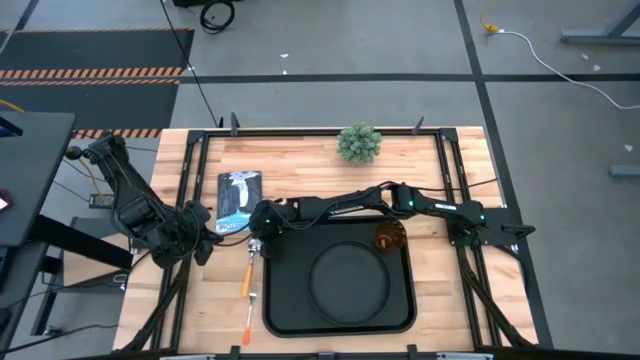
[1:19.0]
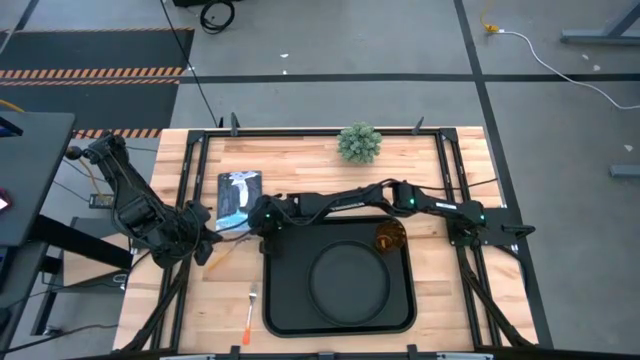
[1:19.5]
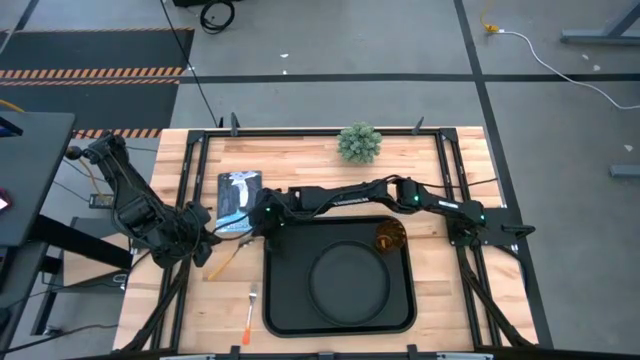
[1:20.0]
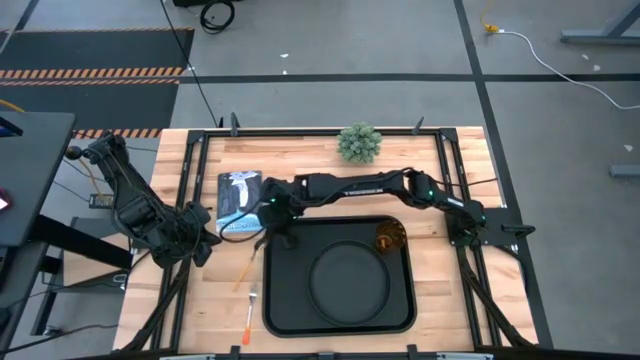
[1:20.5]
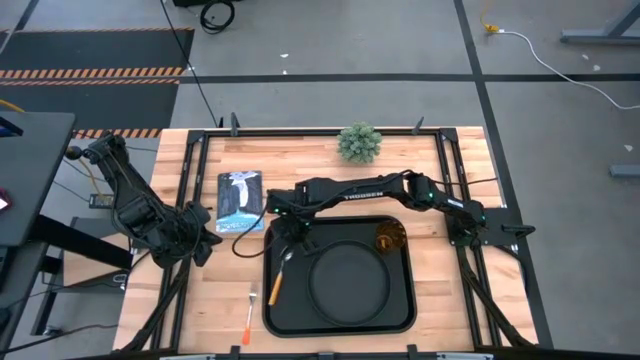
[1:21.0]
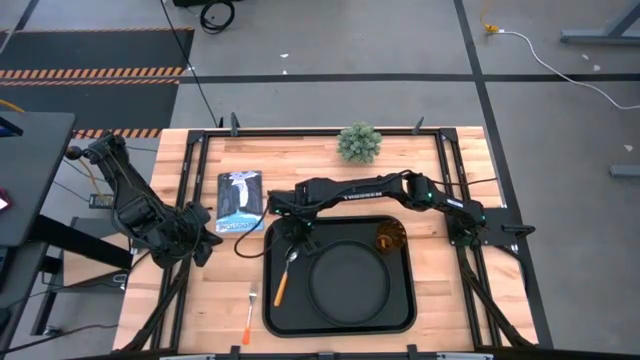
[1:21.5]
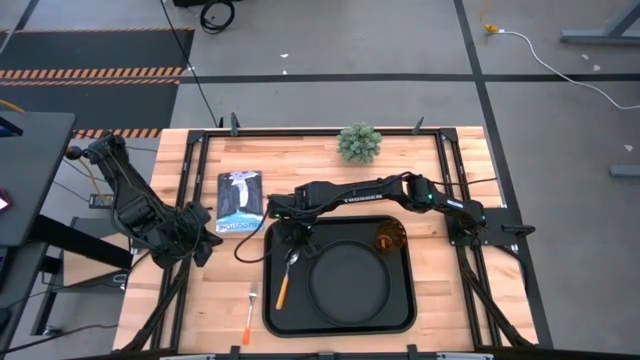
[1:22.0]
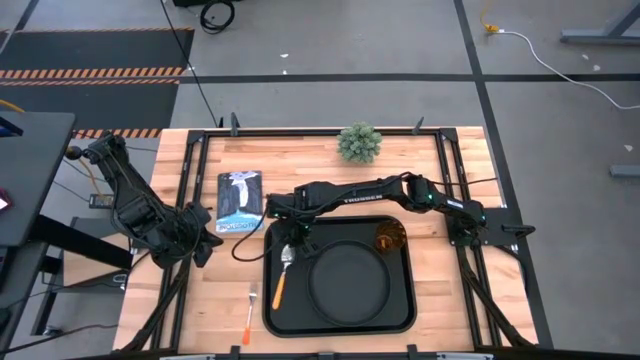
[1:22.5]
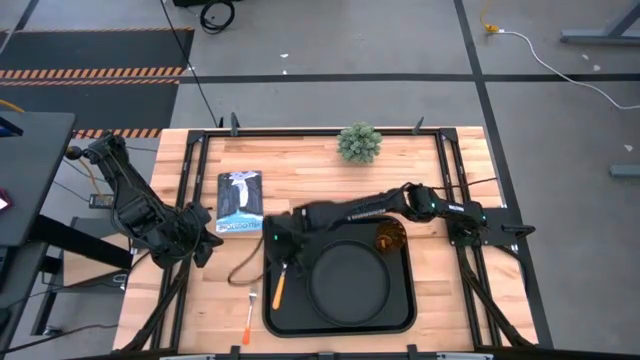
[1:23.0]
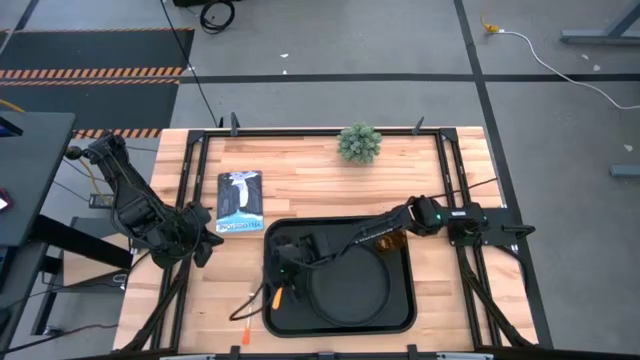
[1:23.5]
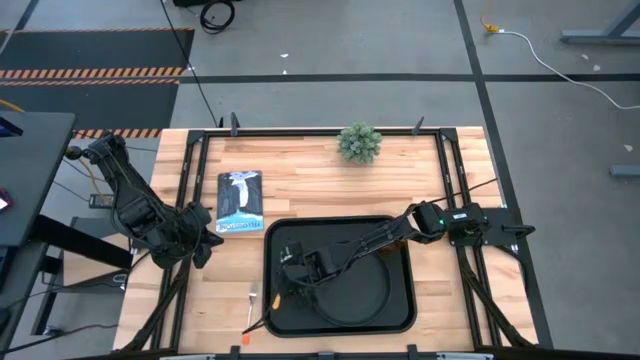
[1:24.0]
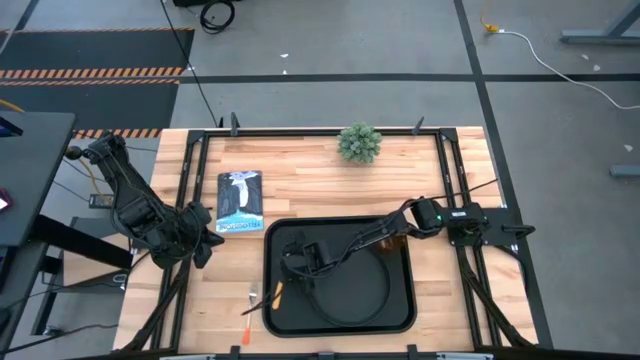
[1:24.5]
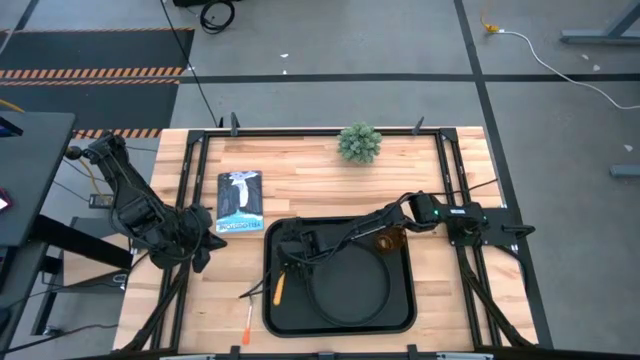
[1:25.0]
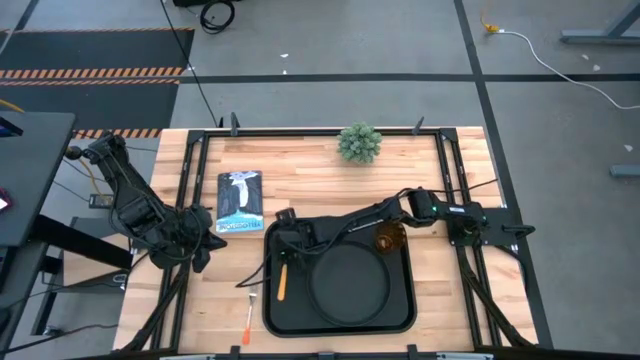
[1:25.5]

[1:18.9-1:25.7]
Task: Pick and place plate/cup/fork/spoon on tray
Put the orange spoon on the black tray

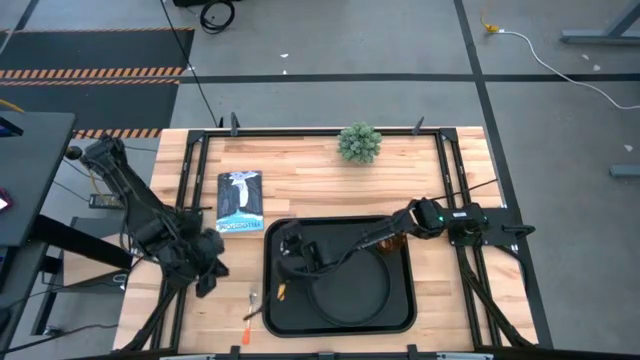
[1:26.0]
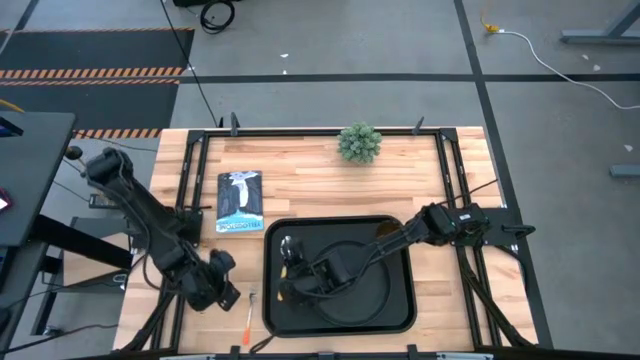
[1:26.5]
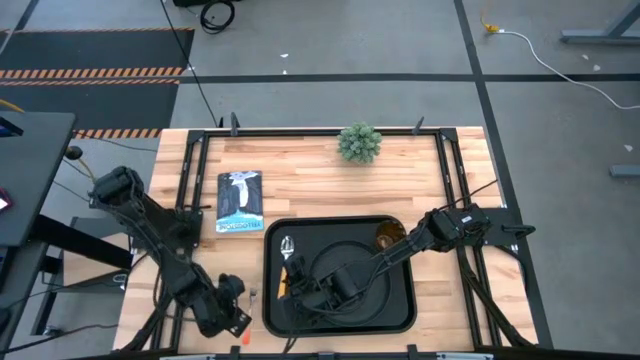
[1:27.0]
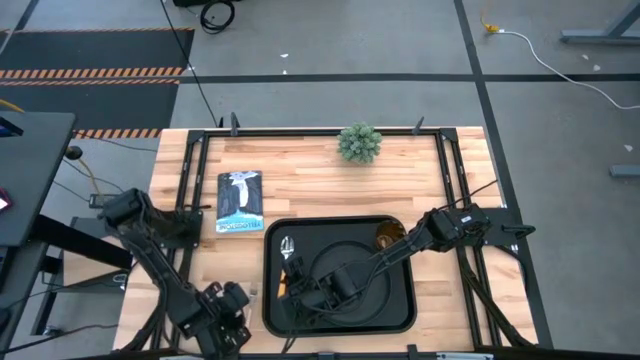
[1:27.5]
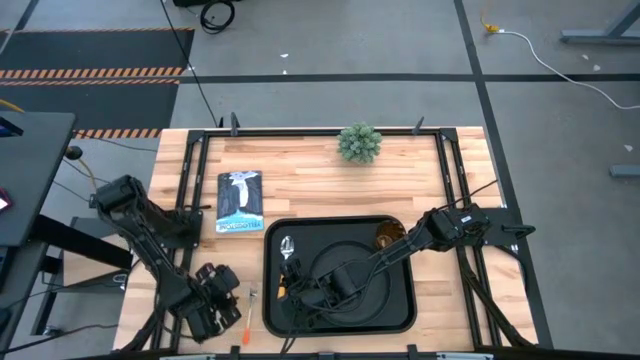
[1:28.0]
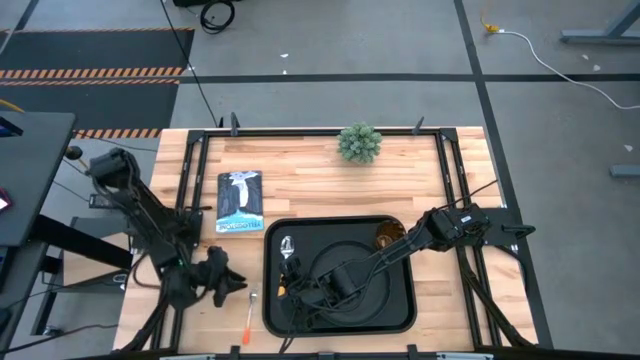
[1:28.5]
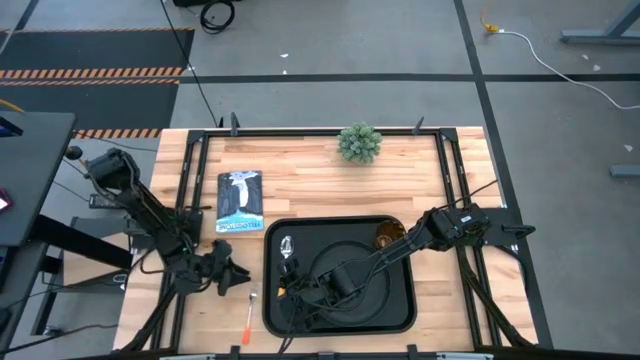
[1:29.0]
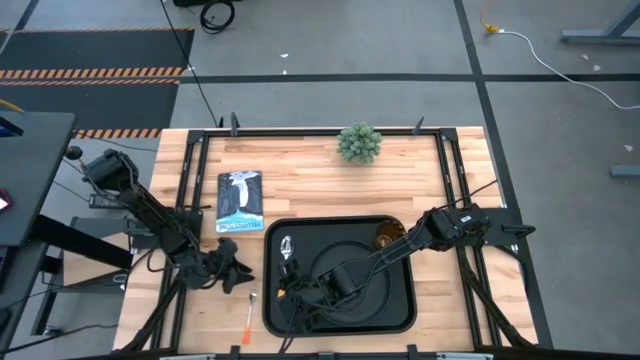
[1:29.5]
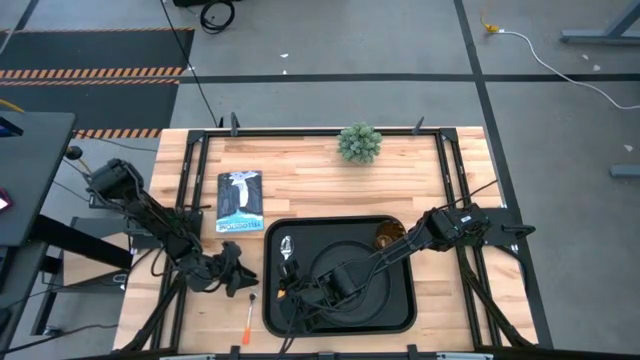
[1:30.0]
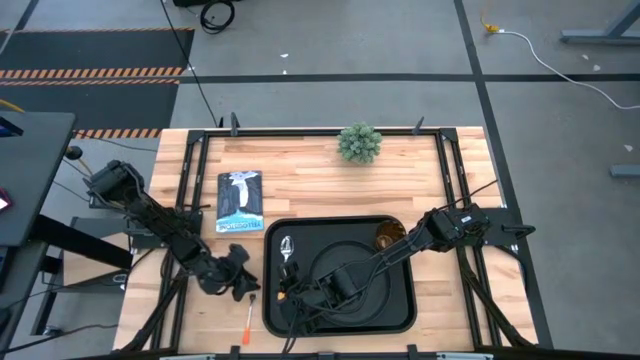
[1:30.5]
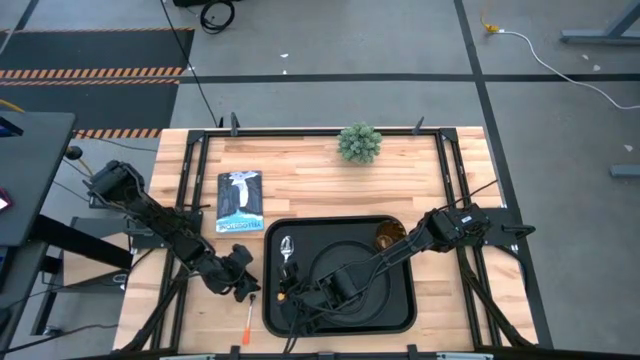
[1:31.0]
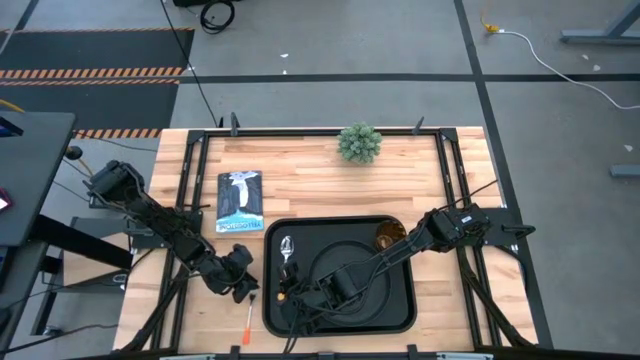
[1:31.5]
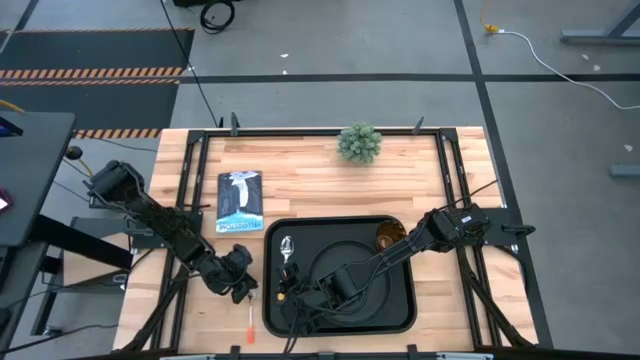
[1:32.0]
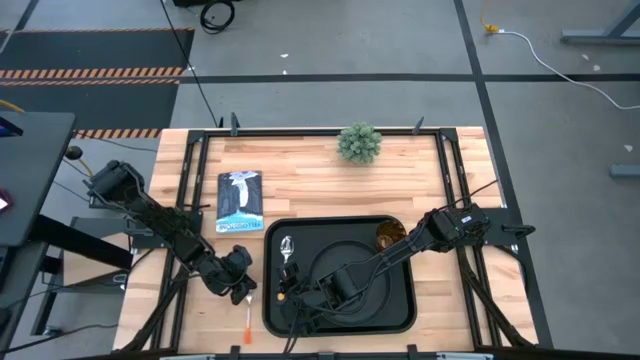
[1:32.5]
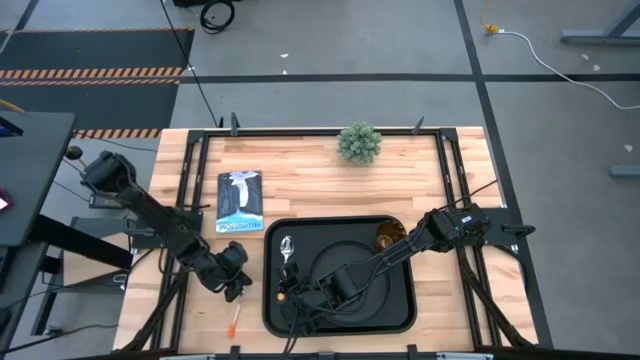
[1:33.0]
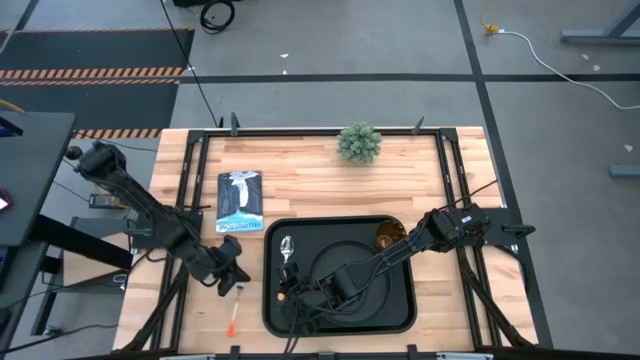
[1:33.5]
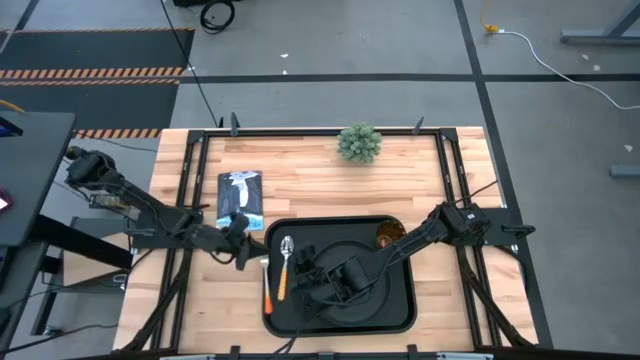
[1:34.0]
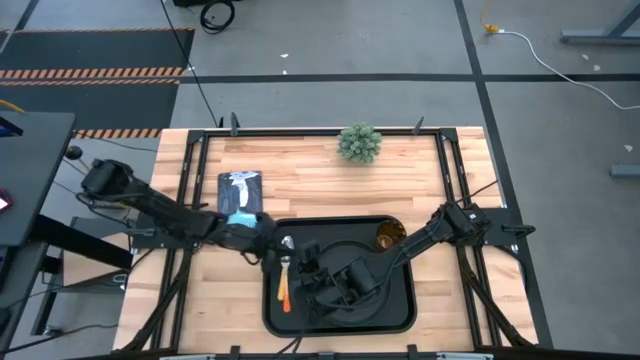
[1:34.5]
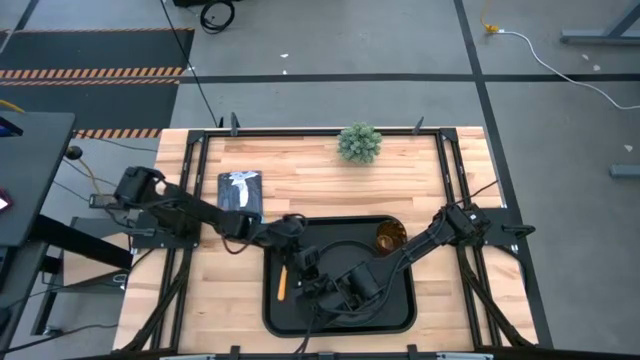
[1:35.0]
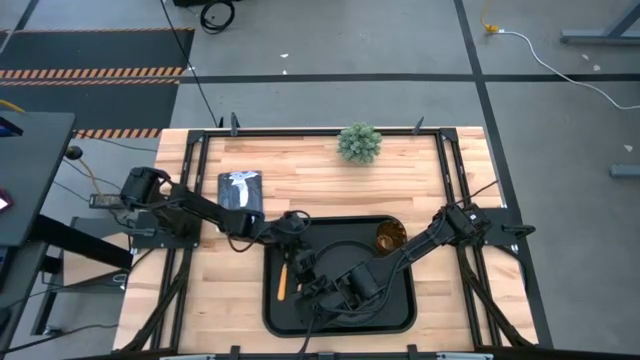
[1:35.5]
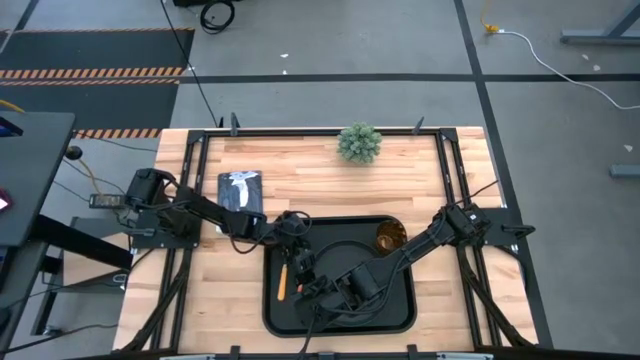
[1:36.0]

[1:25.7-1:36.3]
Put the orange fork on the black tray

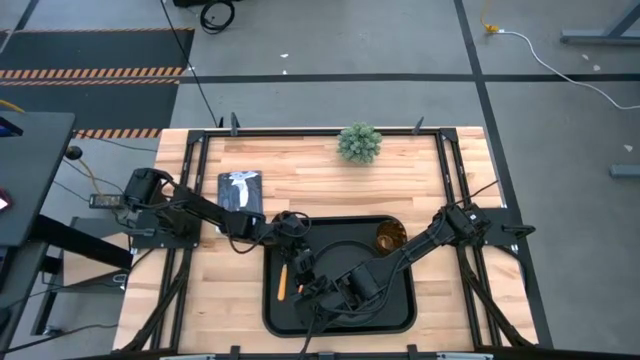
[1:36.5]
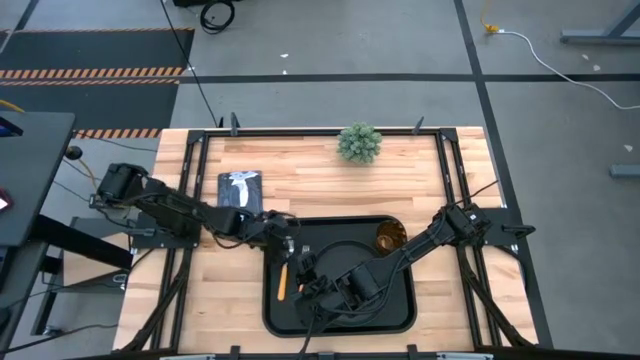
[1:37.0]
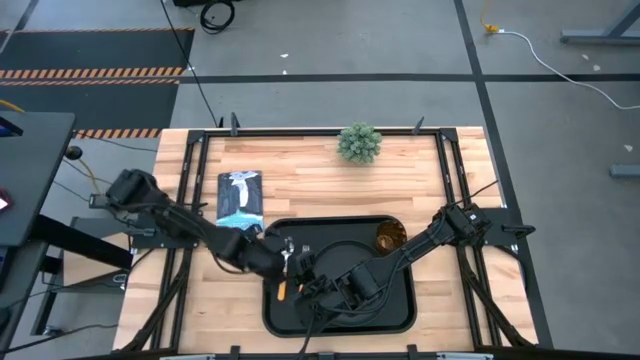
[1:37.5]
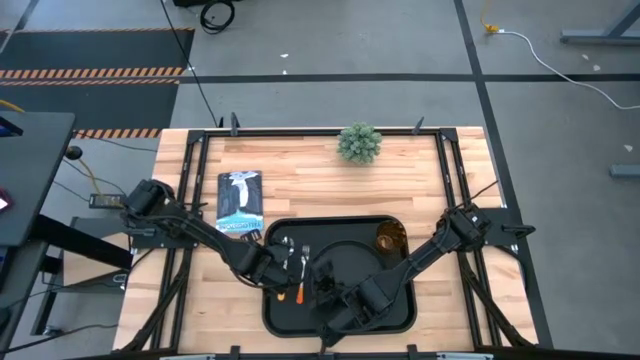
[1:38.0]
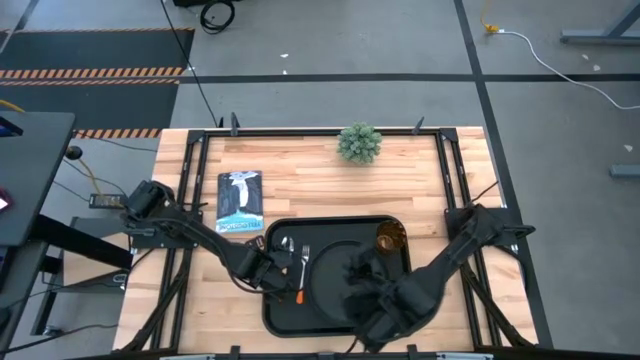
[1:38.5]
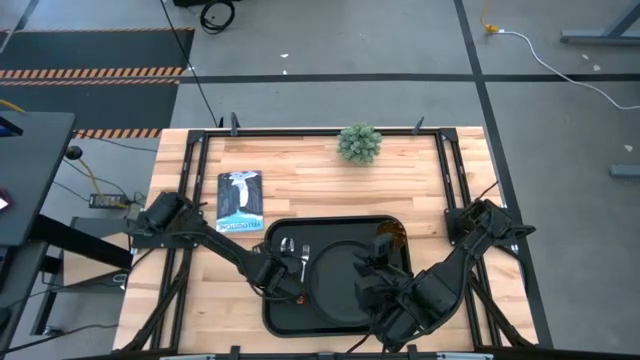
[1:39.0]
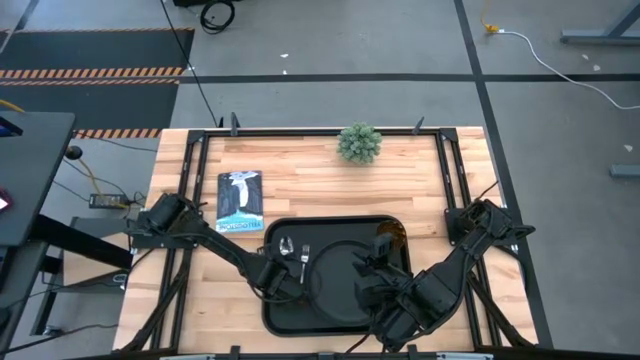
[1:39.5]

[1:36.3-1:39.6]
Adjust the orange spoon on the black tray

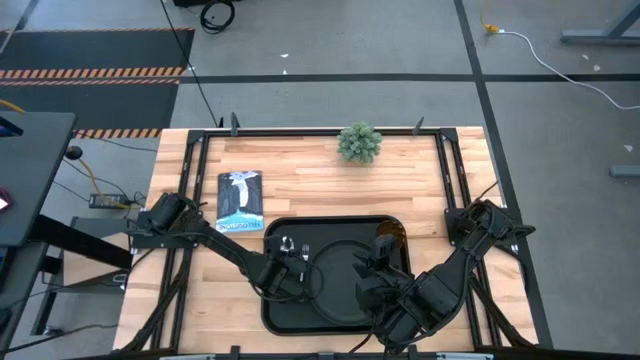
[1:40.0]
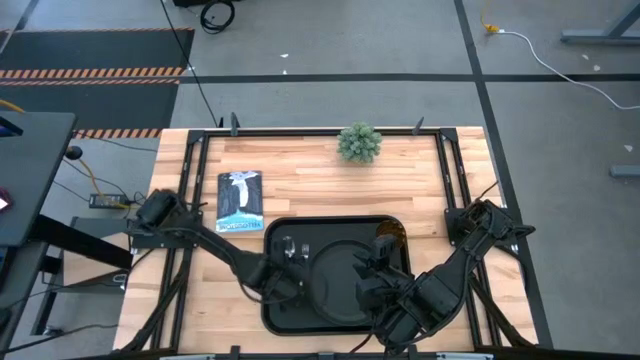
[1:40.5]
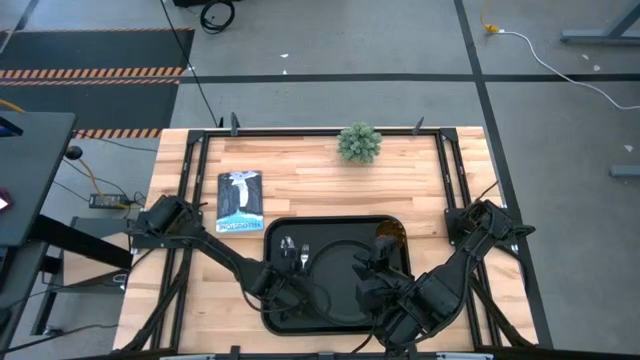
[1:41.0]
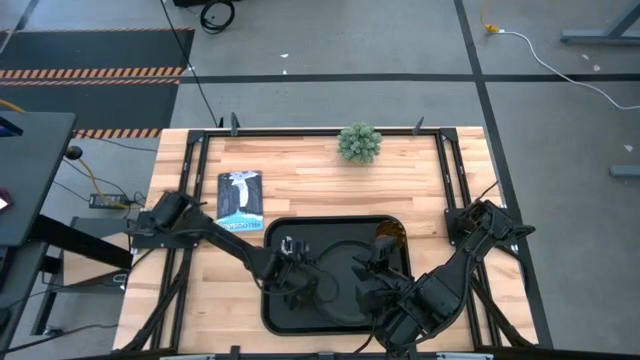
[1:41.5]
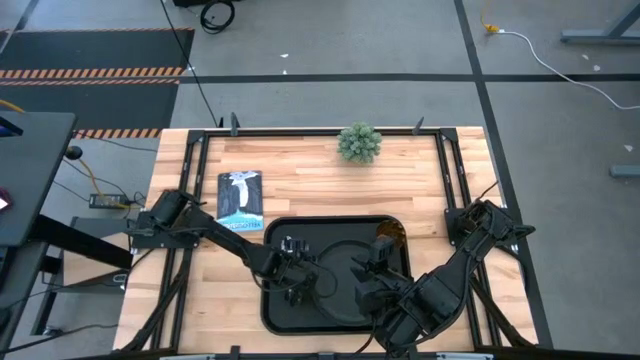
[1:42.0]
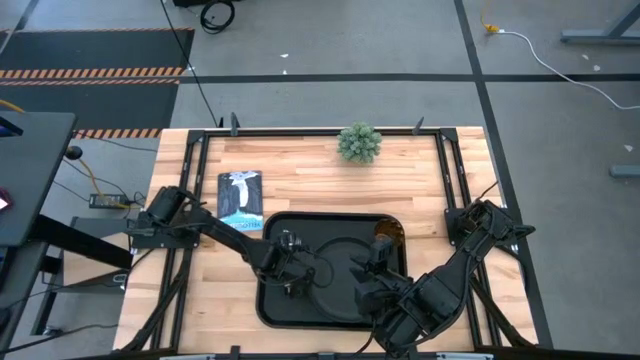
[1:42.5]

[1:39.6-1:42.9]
Adjust the orange fork on the black tray
